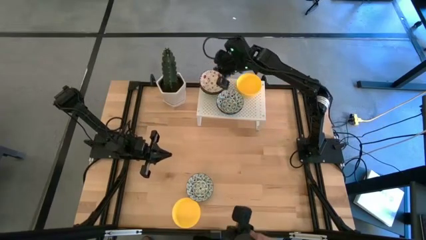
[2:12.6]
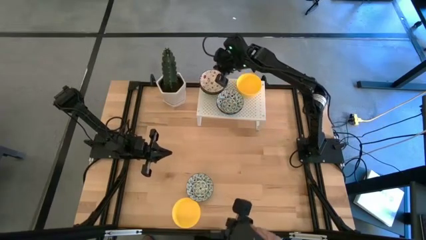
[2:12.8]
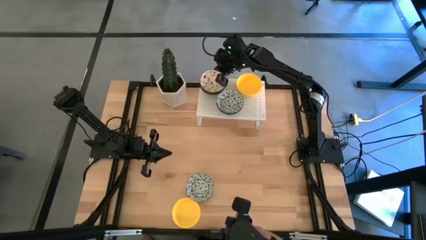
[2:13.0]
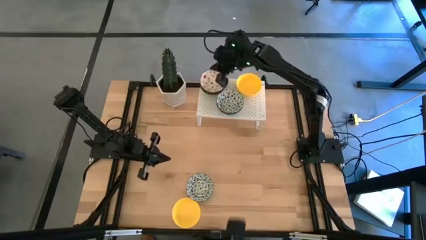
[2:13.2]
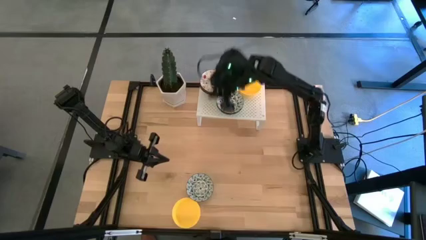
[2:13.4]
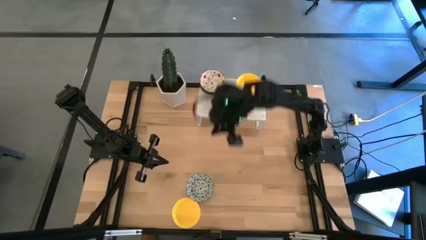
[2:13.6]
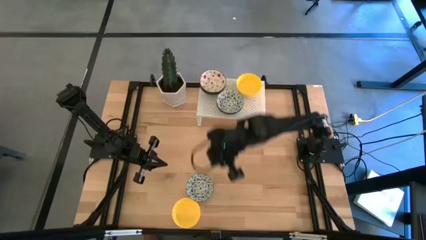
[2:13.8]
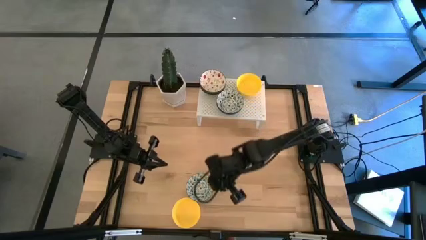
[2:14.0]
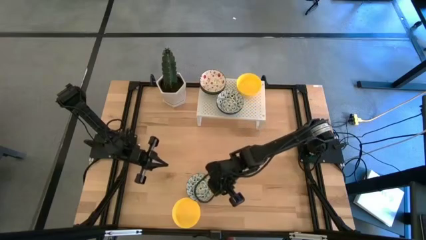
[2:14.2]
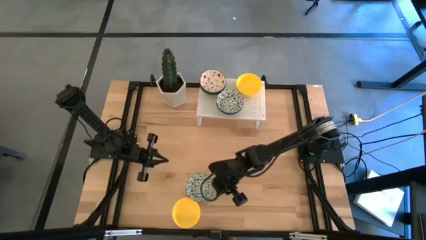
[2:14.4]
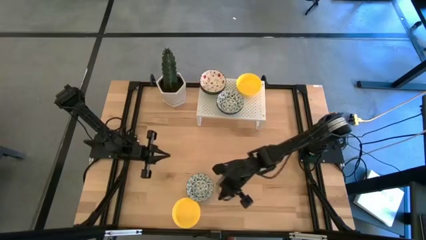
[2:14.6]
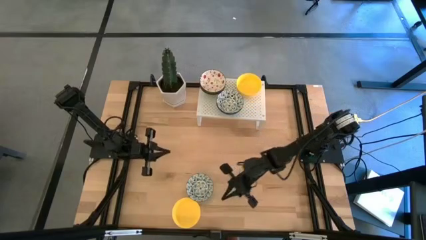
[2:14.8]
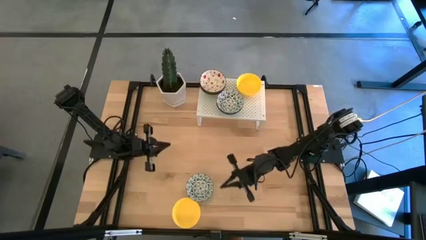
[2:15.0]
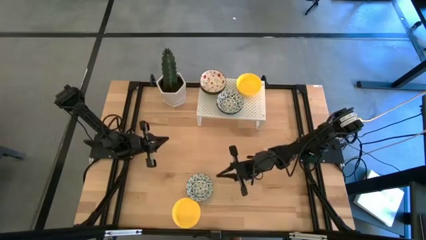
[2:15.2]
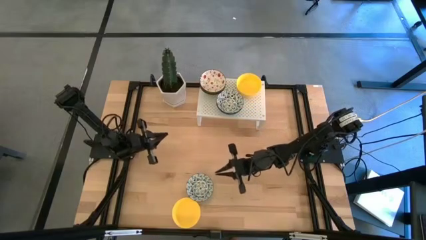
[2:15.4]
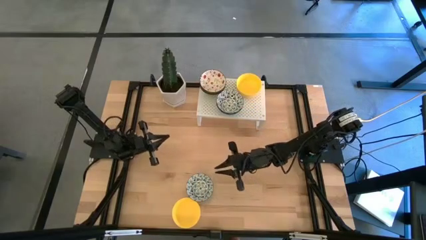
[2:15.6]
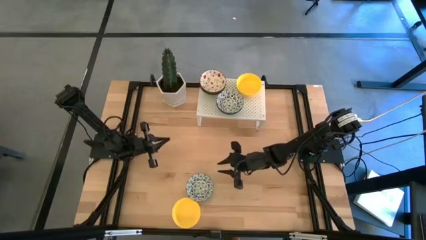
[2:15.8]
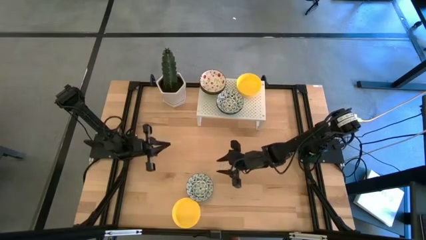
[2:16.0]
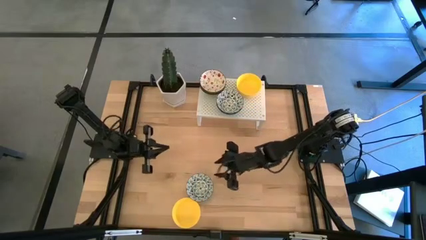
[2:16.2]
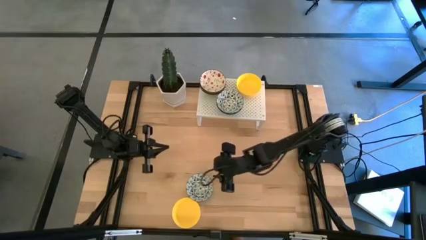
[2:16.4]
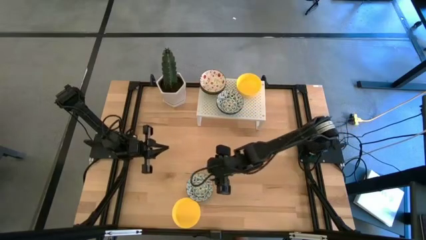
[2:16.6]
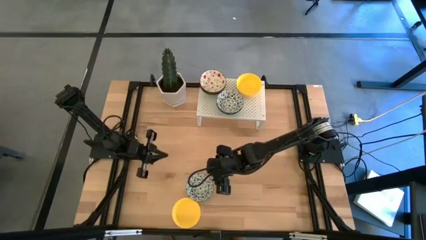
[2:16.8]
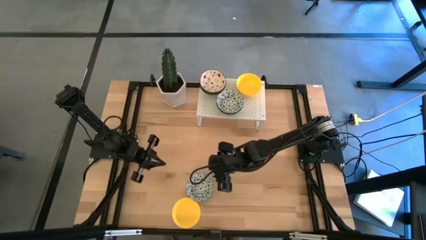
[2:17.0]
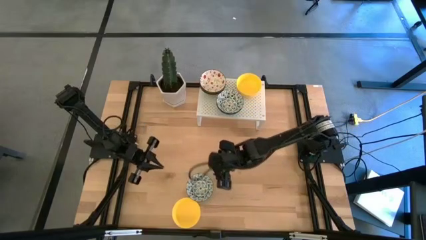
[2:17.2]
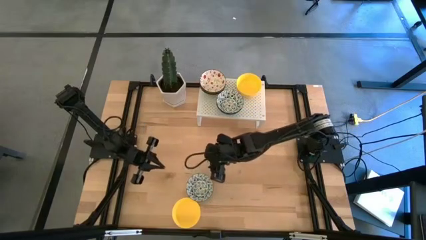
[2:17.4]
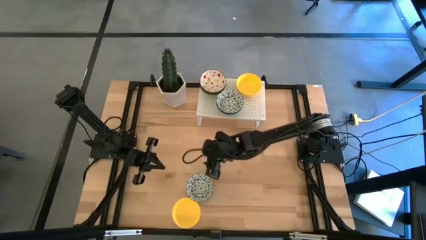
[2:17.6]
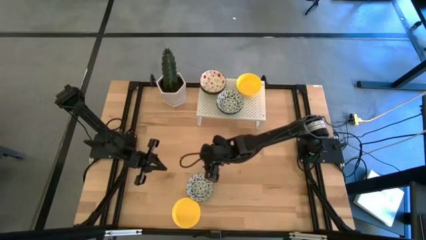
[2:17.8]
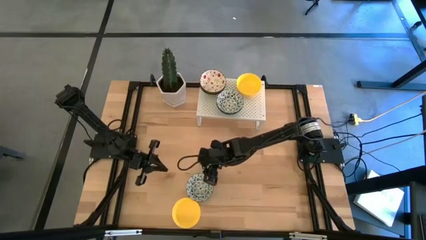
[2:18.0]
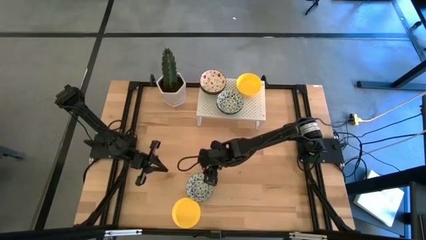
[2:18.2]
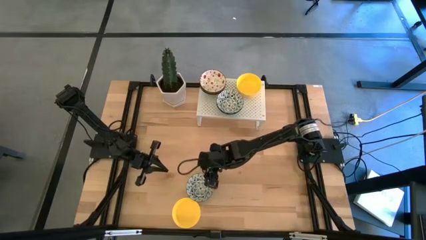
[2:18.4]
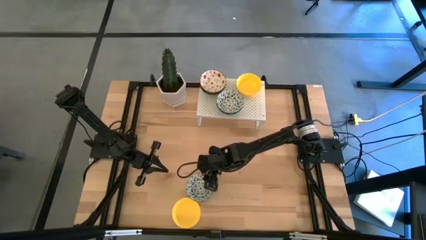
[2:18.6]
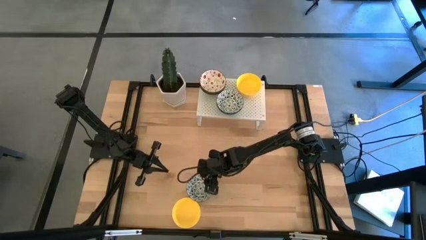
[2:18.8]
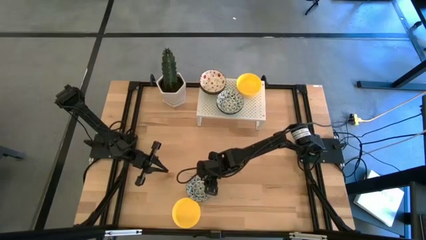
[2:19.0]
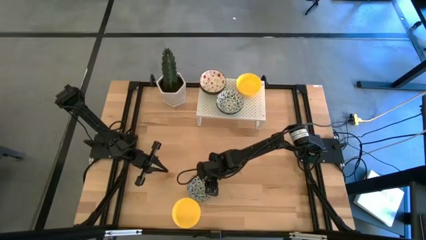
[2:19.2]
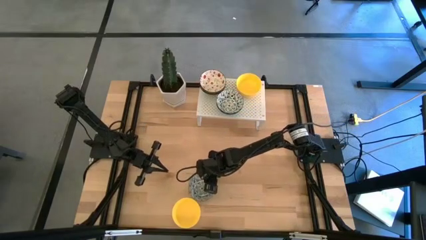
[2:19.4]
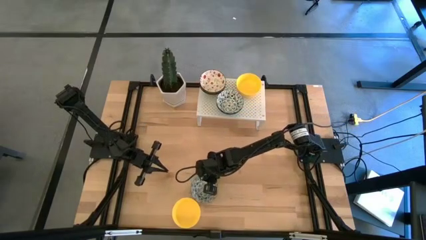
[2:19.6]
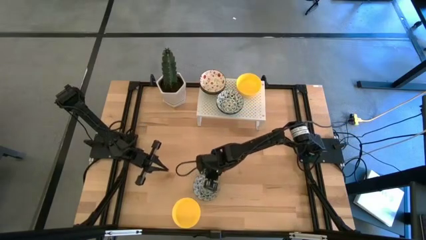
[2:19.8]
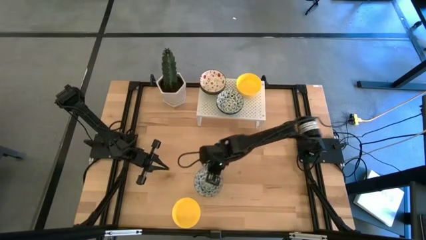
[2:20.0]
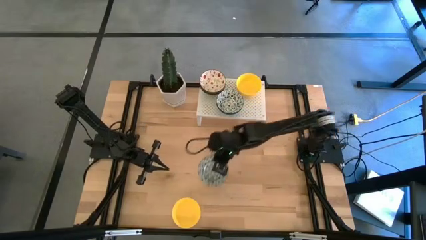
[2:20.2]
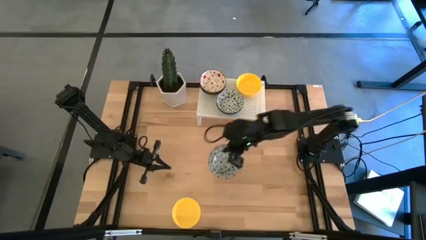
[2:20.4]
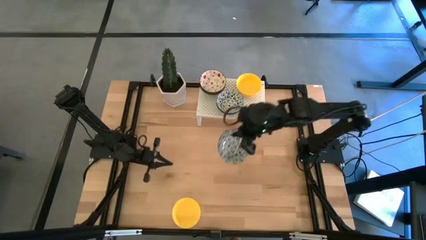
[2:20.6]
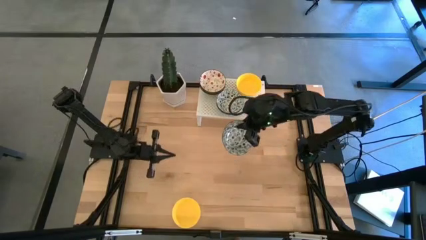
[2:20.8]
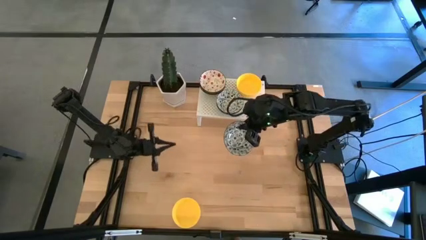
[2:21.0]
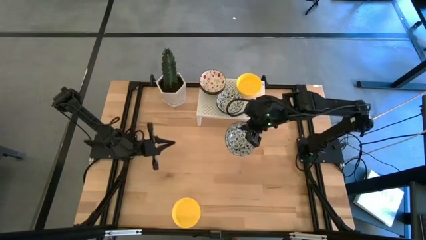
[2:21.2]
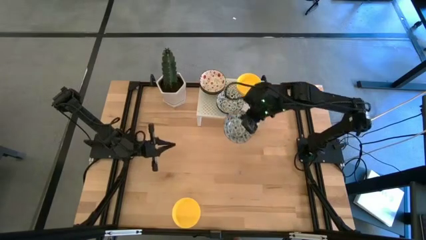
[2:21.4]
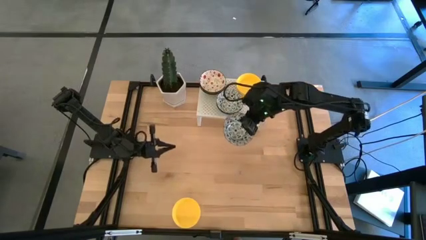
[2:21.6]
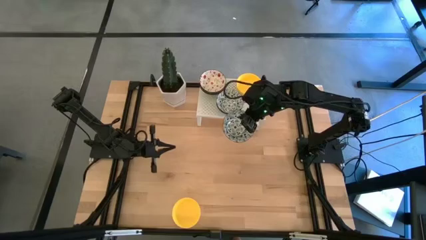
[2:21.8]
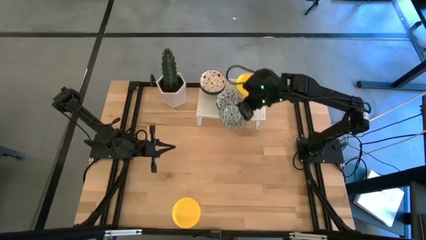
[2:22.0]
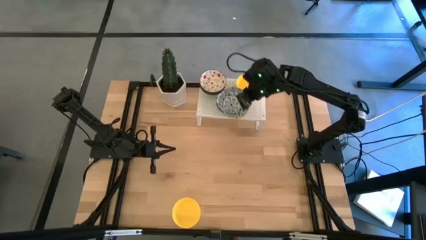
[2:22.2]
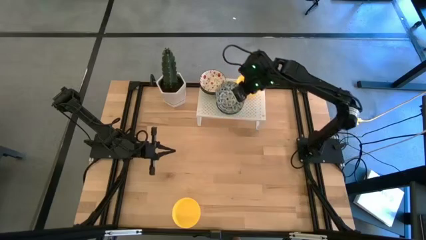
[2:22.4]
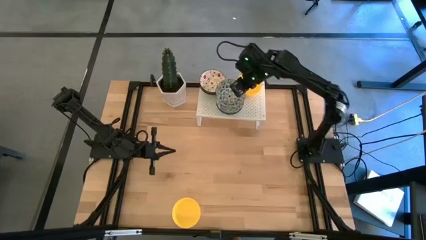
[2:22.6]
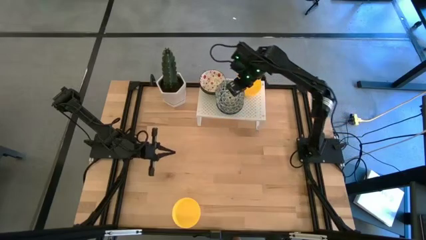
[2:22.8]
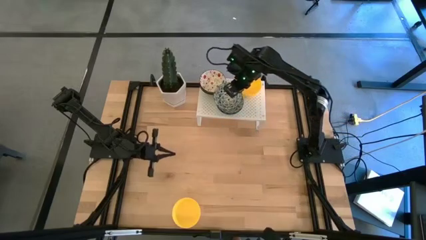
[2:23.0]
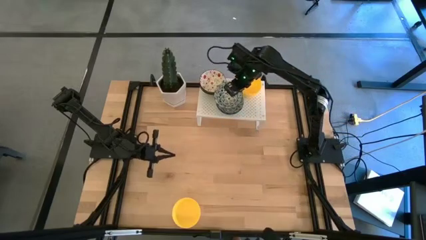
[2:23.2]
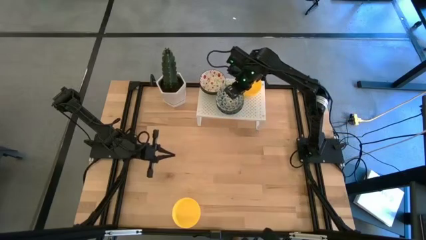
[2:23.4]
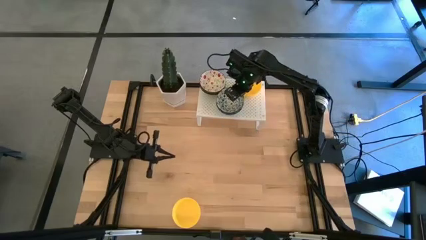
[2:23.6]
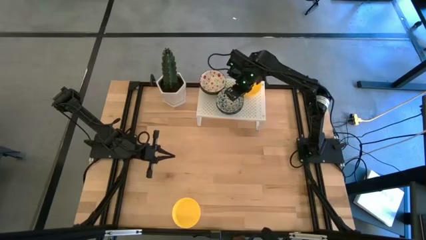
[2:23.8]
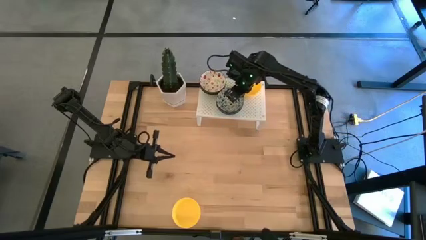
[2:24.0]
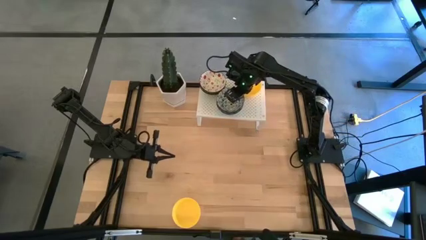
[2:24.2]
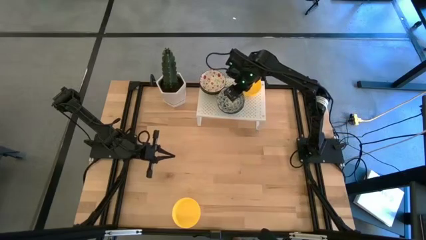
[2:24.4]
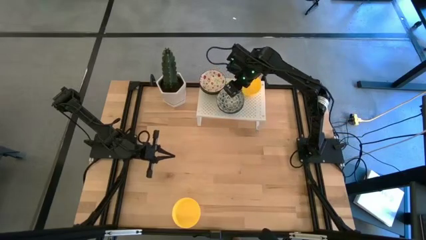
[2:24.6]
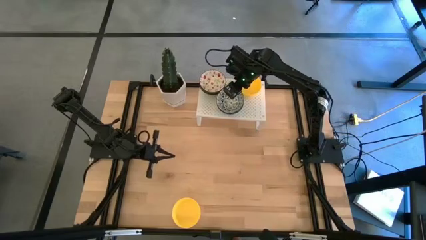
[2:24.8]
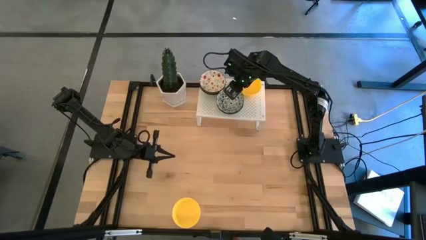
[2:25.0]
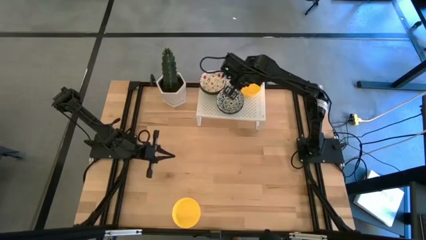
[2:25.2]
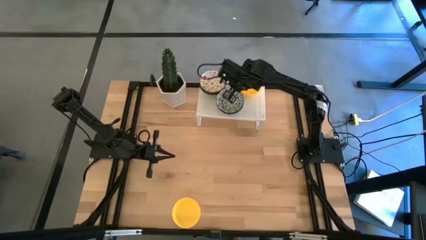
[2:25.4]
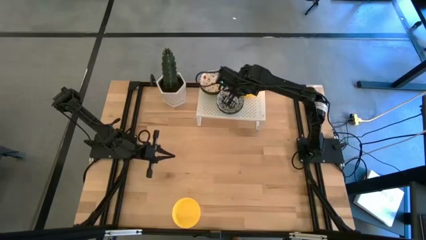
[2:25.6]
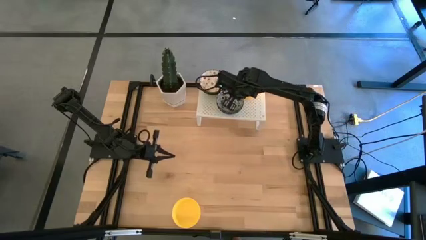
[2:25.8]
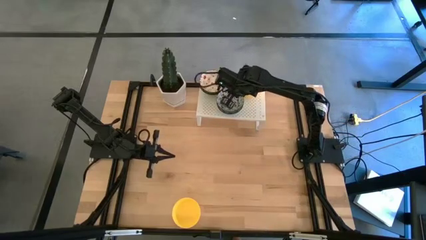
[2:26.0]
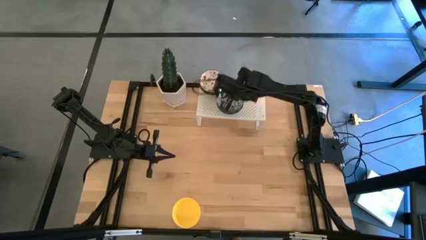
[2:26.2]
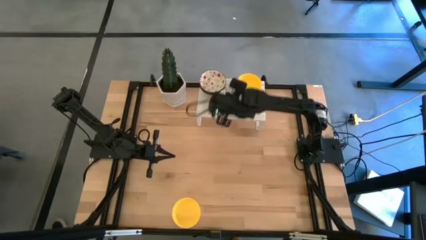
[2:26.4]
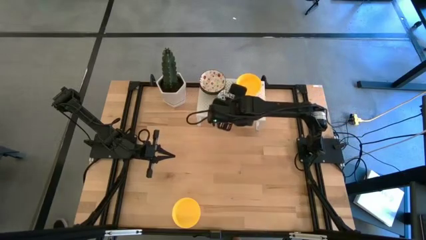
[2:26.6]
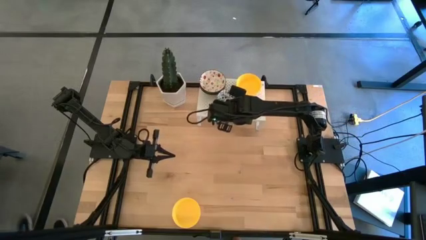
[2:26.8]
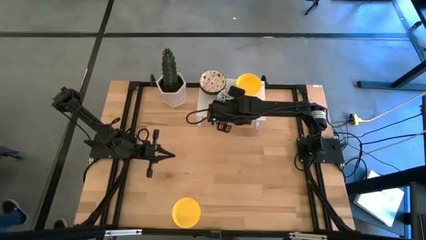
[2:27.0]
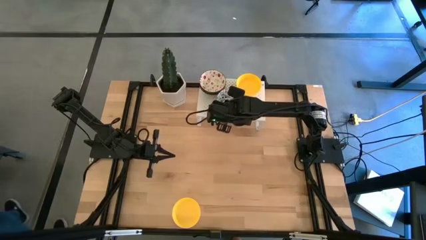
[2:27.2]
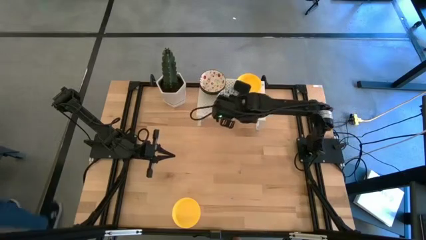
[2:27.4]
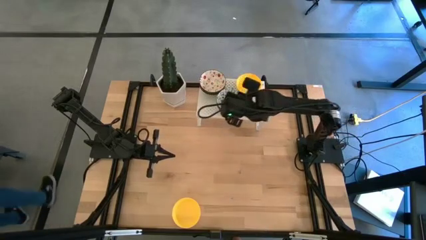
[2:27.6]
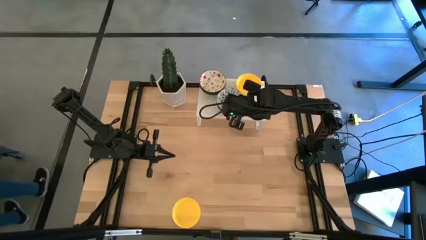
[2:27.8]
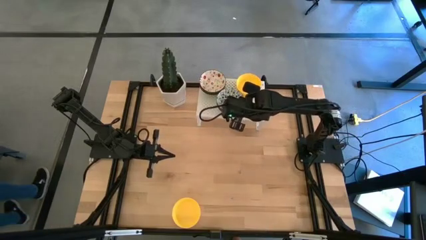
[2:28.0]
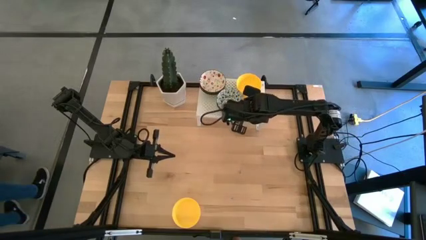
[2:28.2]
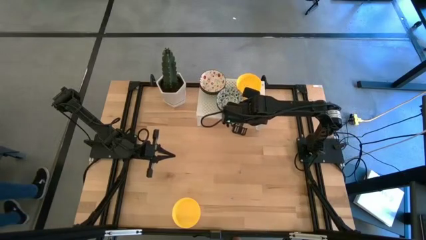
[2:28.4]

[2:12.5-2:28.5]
Task: Pick & Place Mini bowls
Stack the green patterned bowl on the green patterned bowls on the shelf
